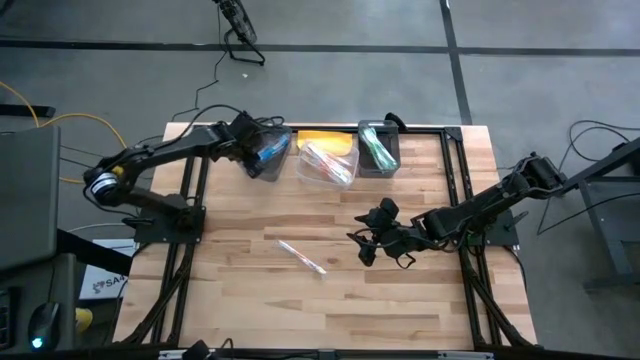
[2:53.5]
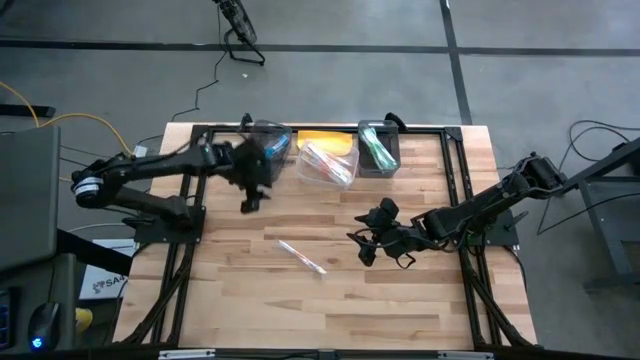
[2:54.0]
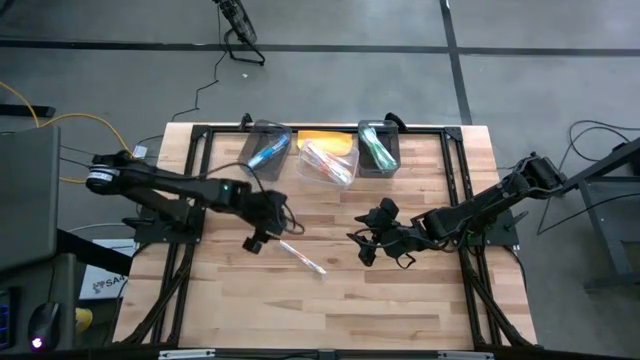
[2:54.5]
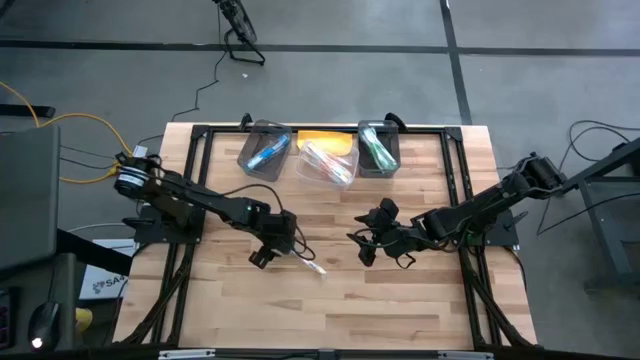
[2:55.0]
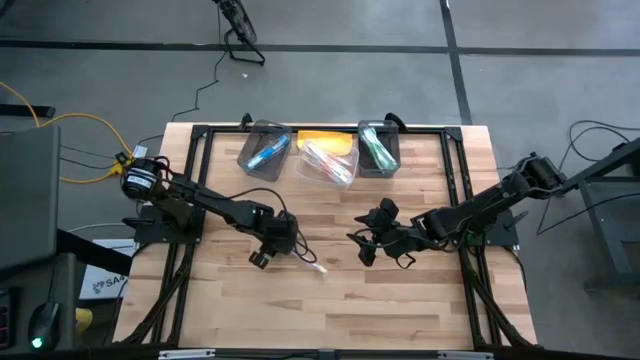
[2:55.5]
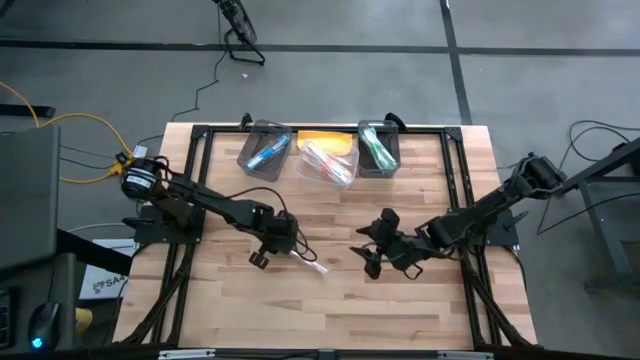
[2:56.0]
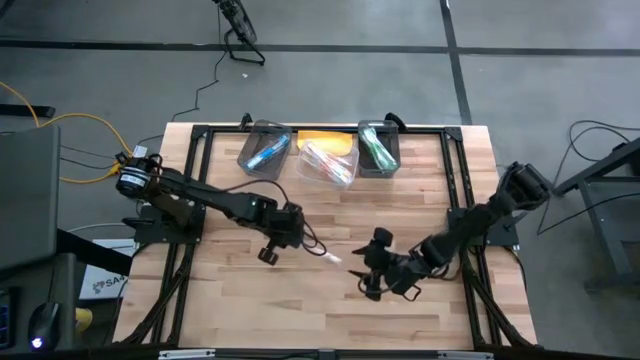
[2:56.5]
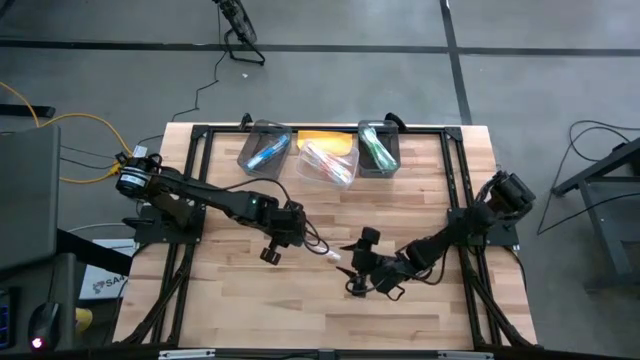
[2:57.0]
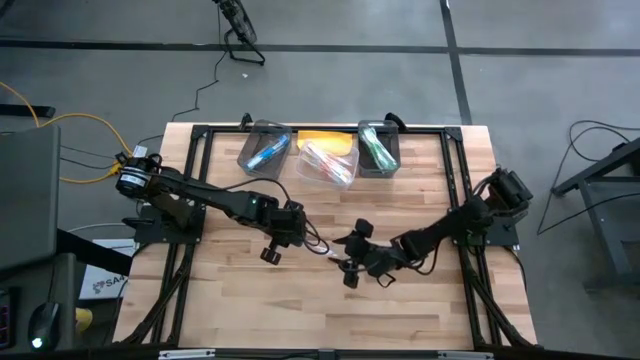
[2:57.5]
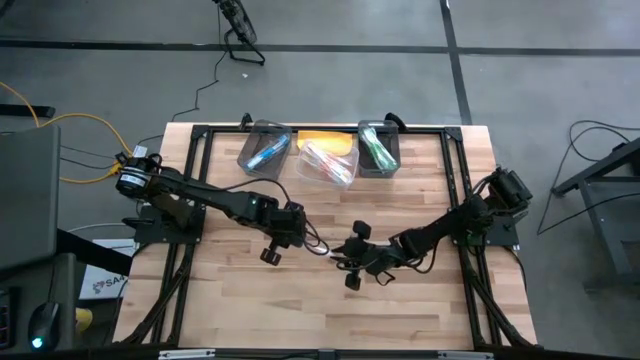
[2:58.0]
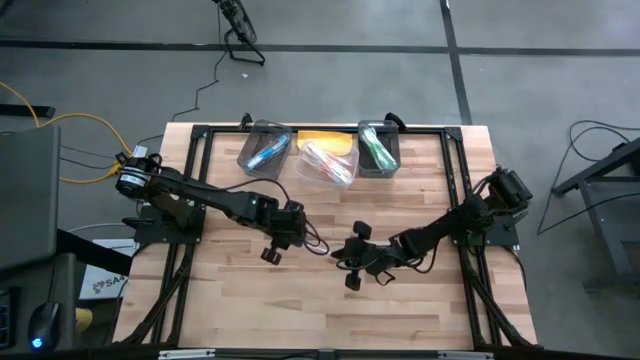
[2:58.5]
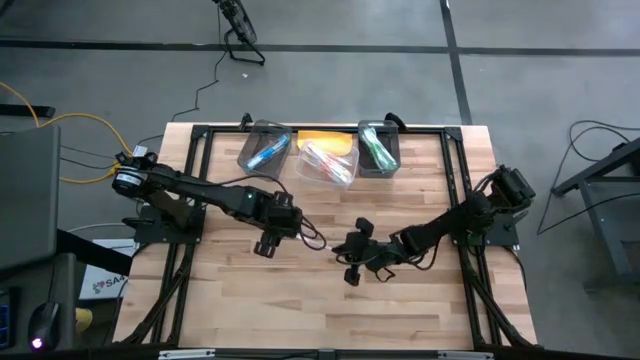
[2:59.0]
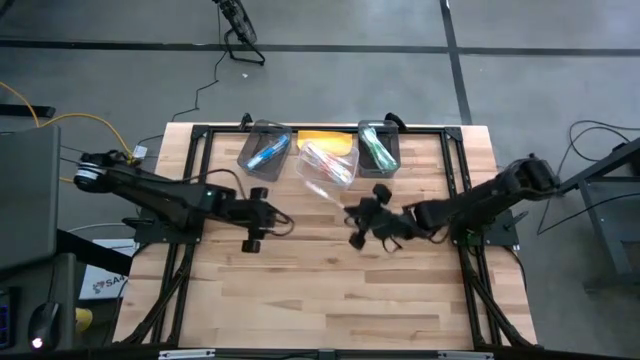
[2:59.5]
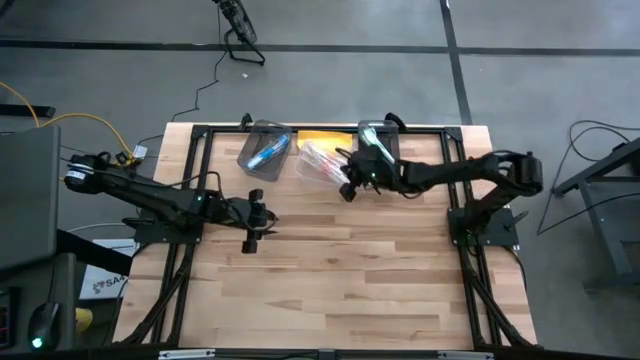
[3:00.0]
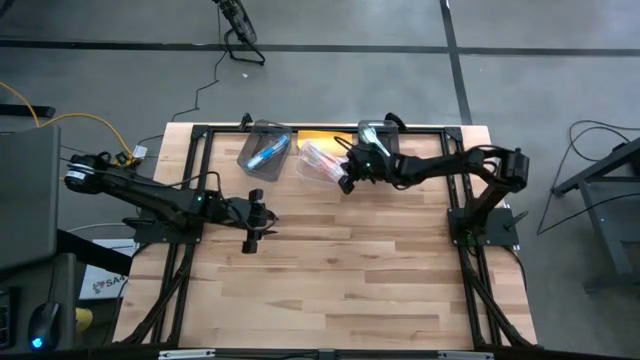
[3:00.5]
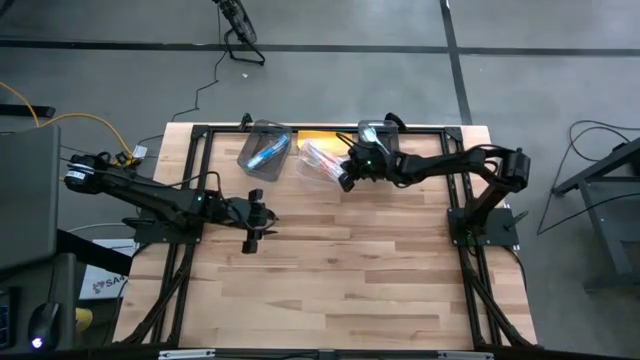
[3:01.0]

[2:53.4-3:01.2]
Task: Pick & Place Toothbrushes
Put the orange toothbrush into the transparent bin

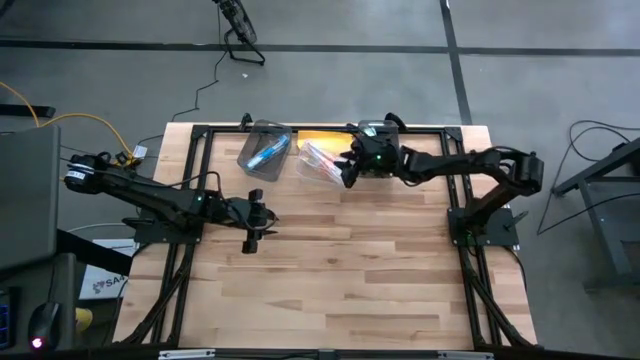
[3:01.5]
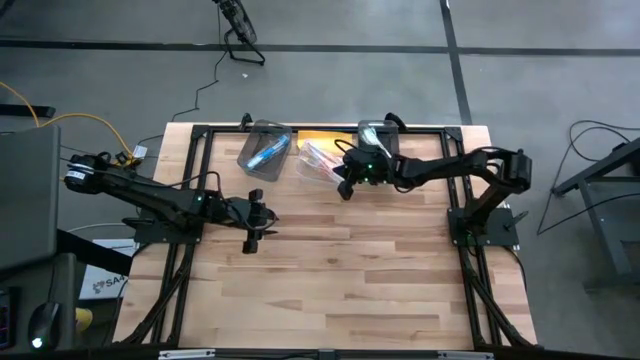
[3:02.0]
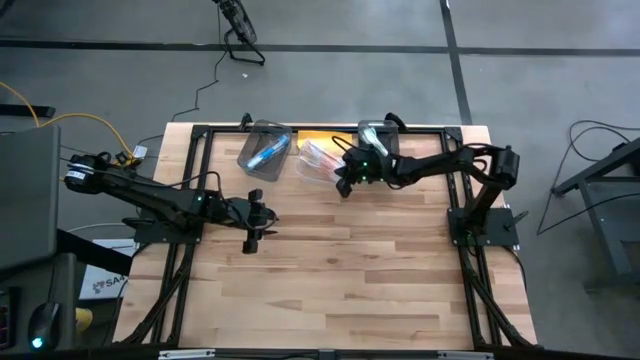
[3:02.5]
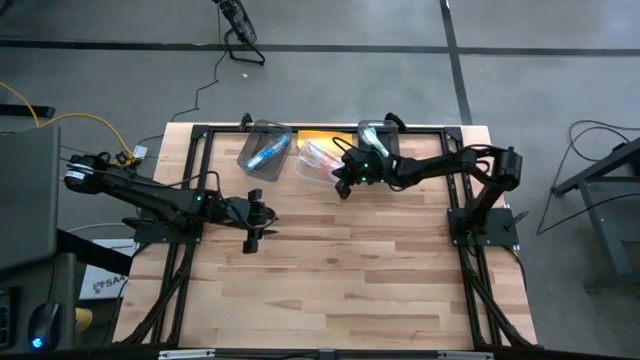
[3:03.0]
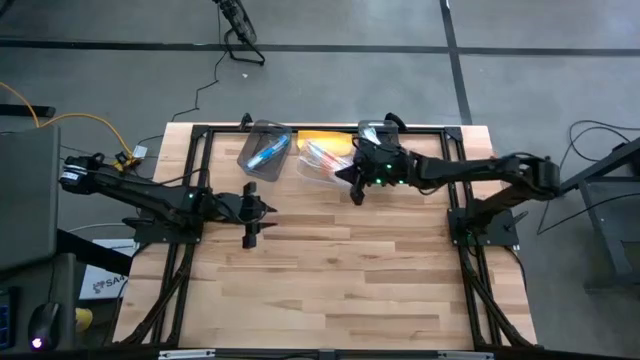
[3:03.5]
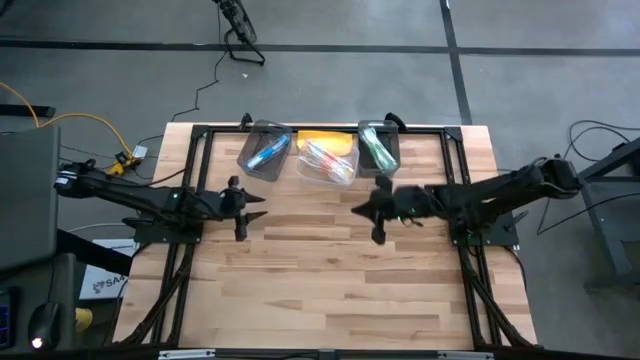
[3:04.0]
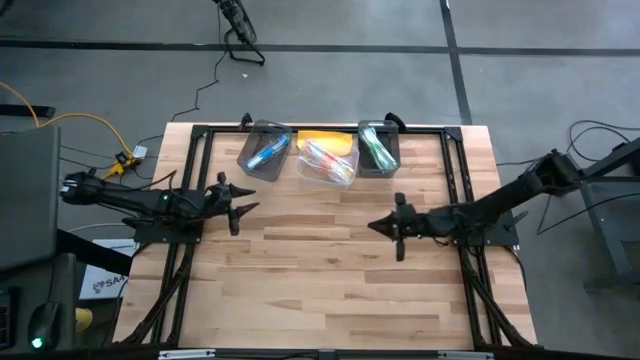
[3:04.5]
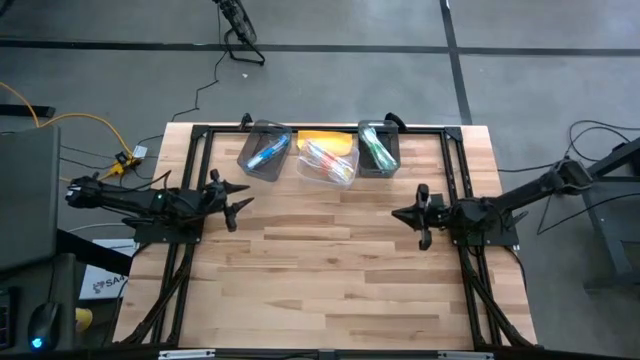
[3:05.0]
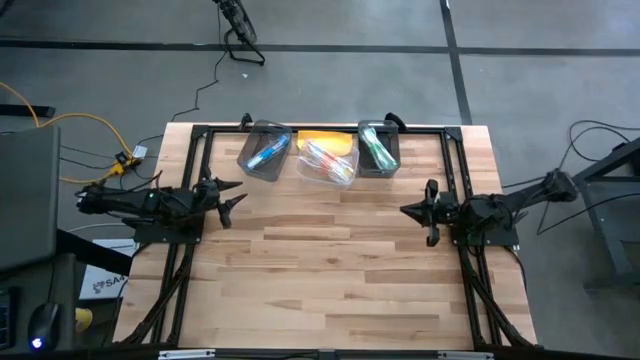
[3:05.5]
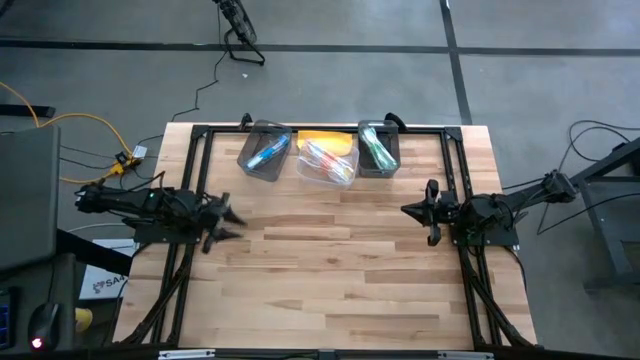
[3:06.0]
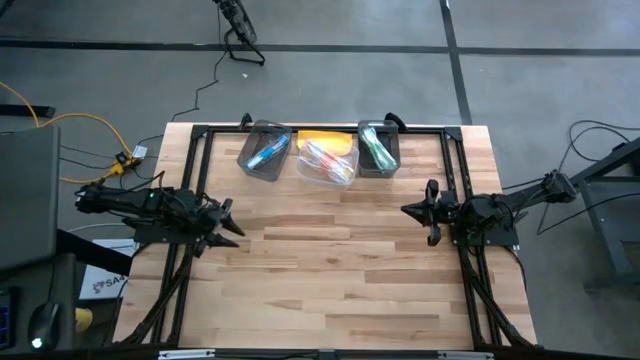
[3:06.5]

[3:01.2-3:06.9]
Return to Home Position

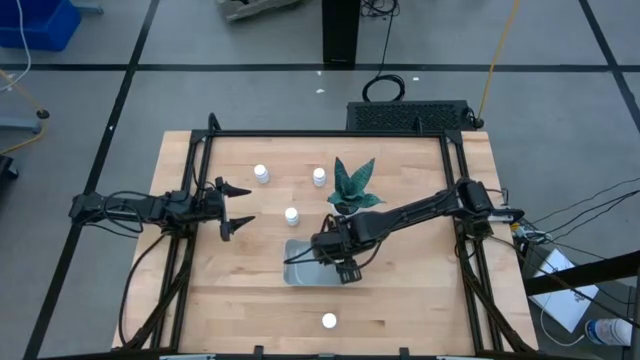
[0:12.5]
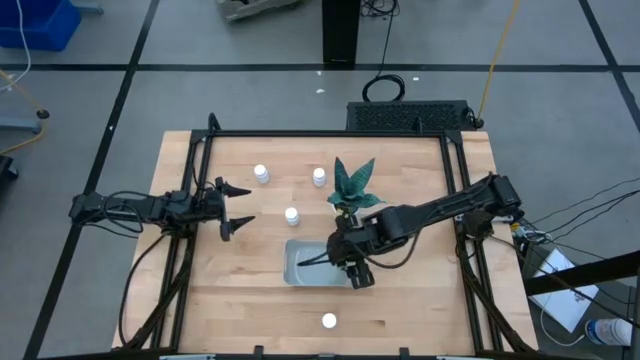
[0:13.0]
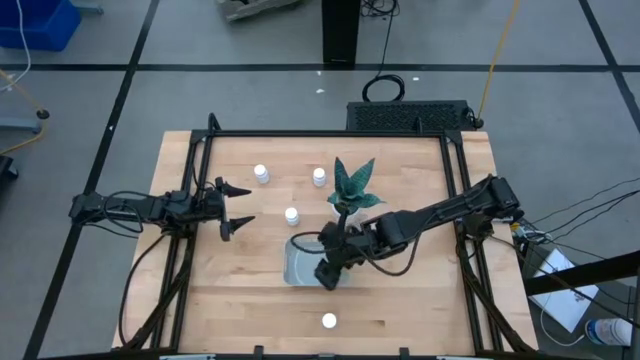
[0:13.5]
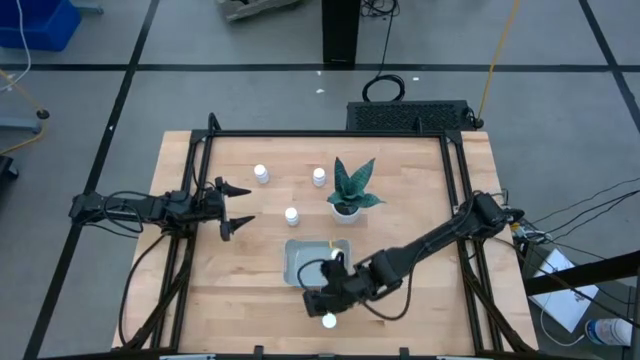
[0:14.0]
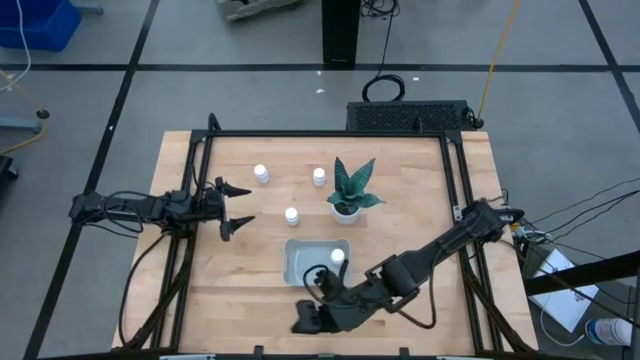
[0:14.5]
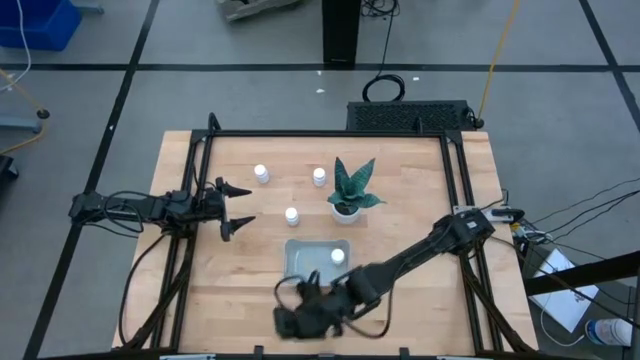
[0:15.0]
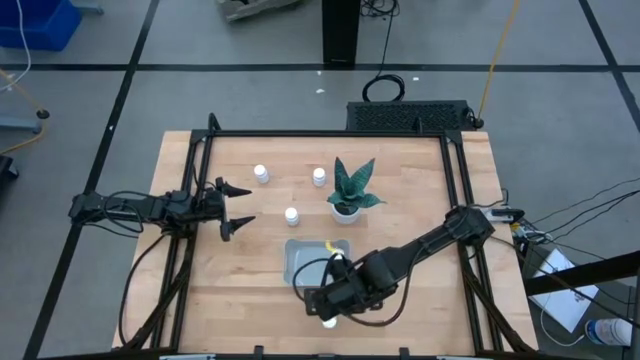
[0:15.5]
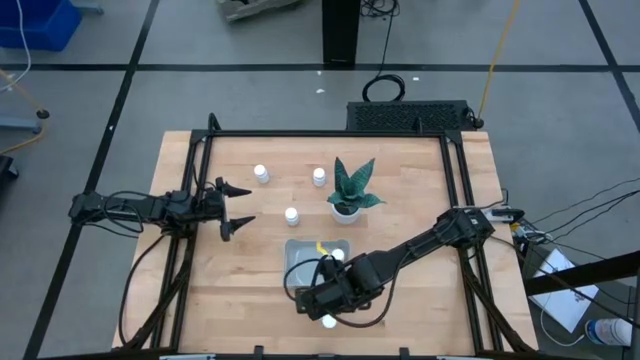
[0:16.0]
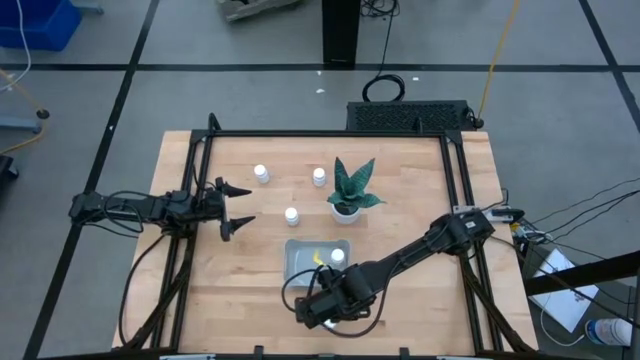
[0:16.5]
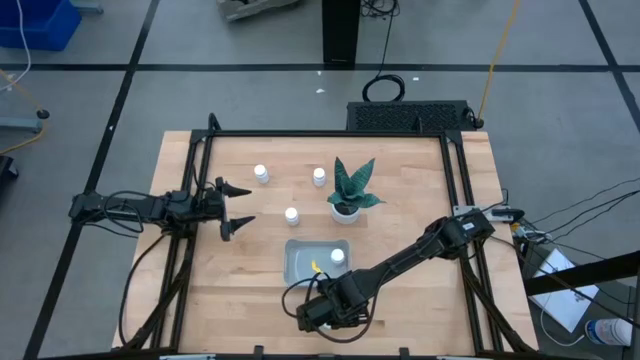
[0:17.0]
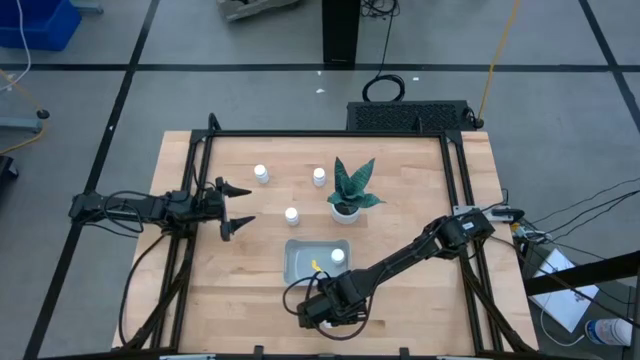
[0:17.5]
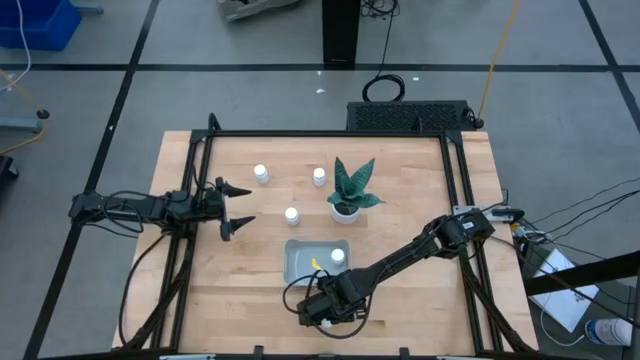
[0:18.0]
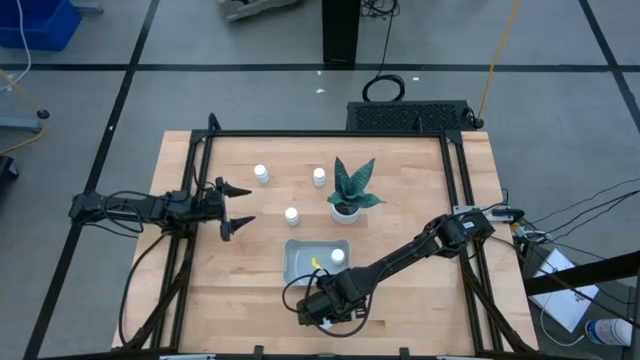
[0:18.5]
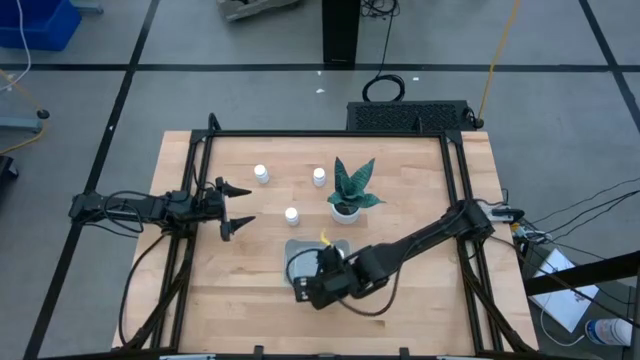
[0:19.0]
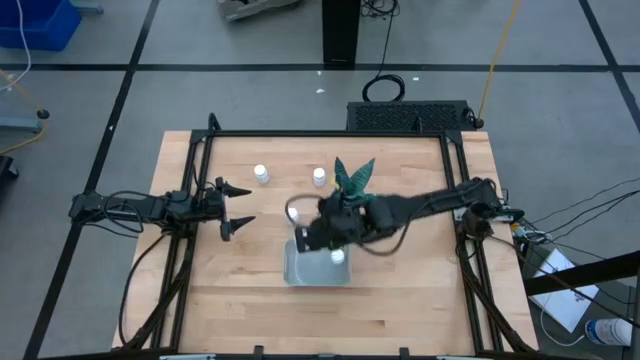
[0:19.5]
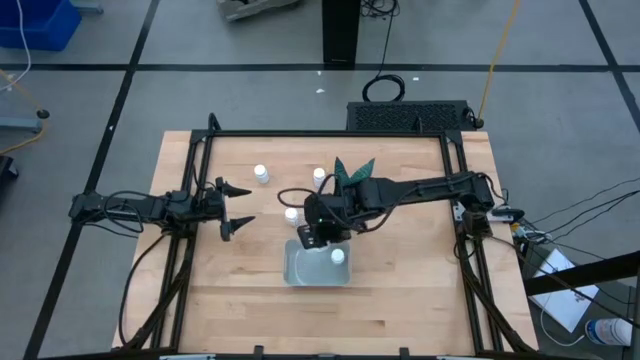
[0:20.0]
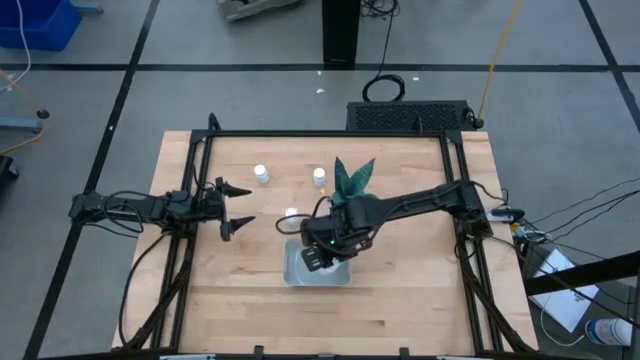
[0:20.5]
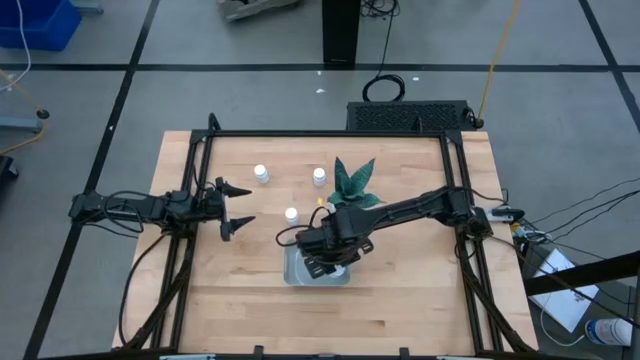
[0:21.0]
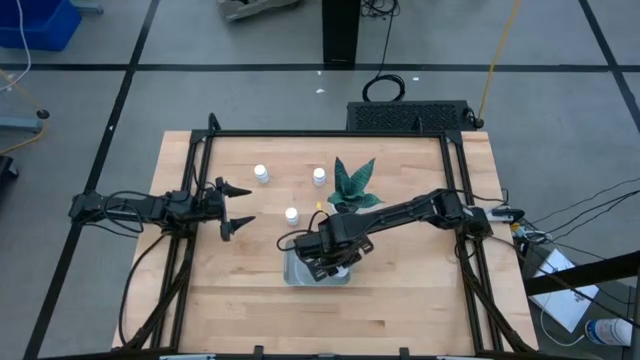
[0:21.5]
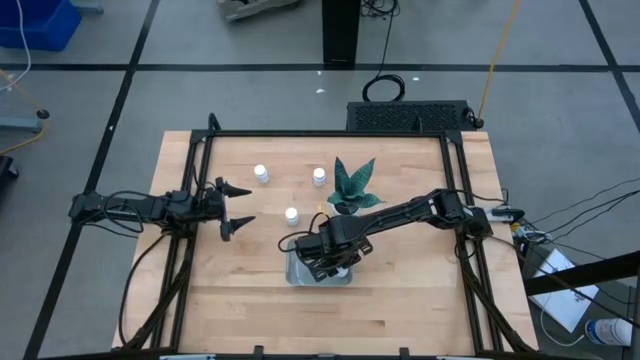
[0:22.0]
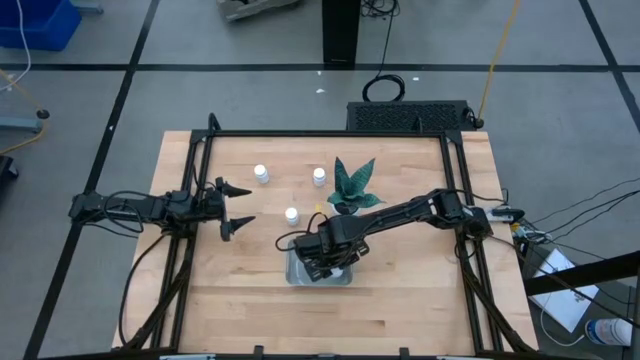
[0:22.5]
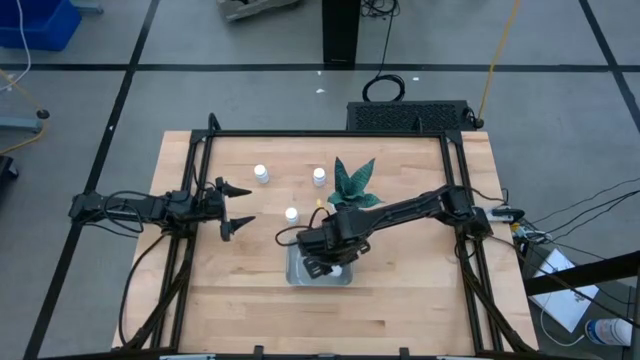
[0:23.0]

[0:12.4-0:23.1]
Task: Pick and place pill bottles into a basket
Put the white pill bottle into the white bin
